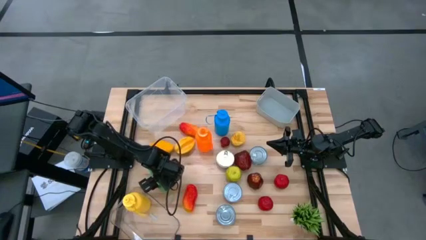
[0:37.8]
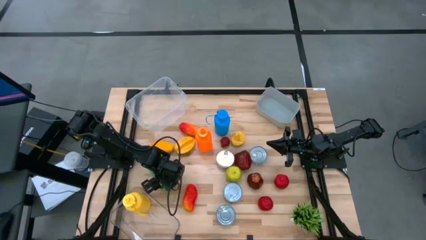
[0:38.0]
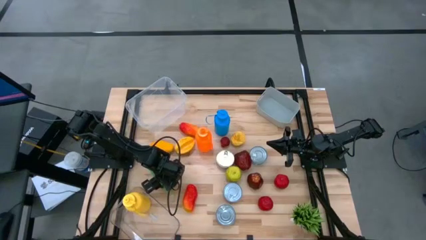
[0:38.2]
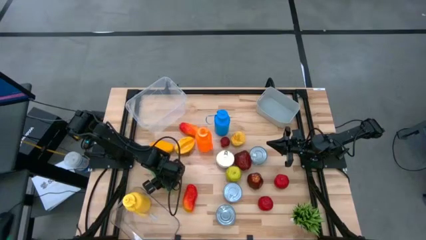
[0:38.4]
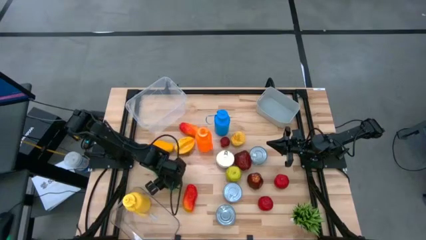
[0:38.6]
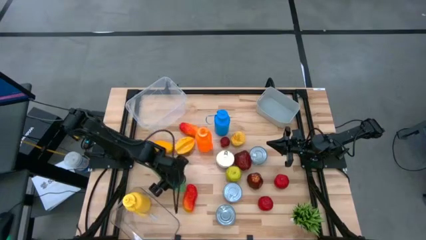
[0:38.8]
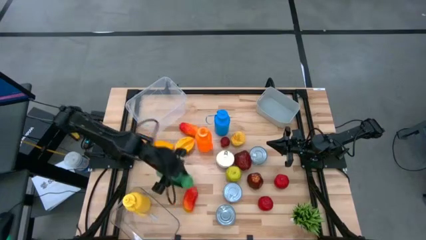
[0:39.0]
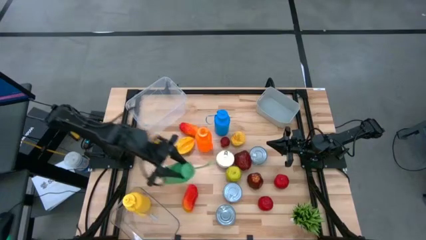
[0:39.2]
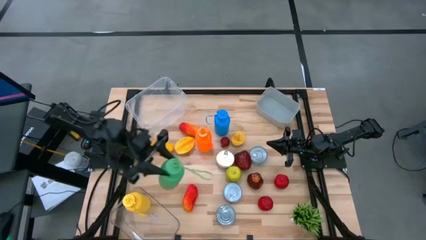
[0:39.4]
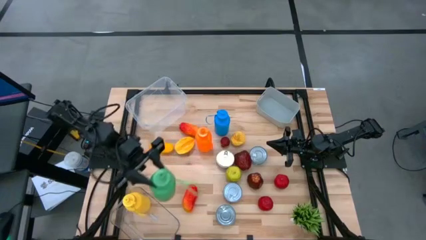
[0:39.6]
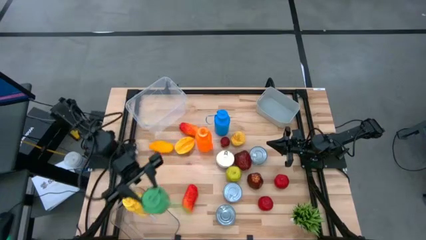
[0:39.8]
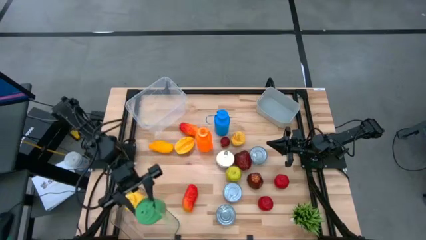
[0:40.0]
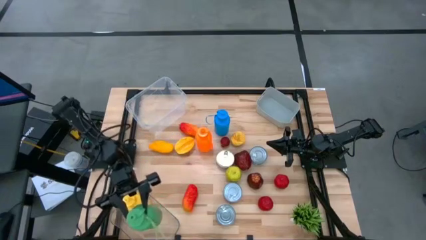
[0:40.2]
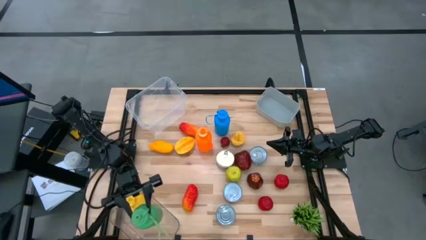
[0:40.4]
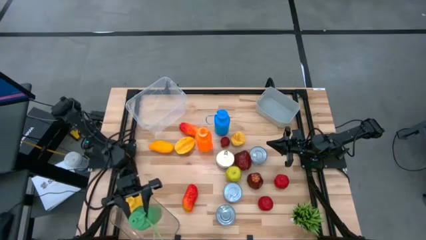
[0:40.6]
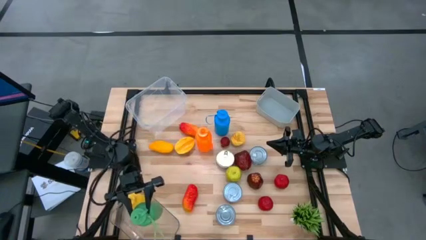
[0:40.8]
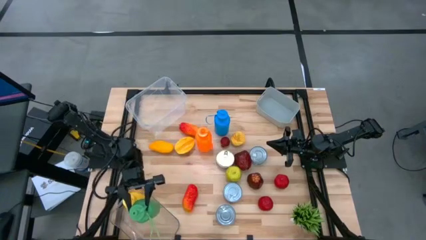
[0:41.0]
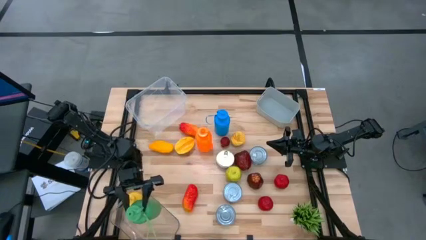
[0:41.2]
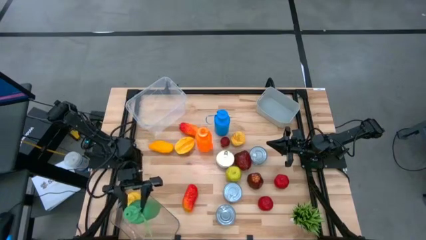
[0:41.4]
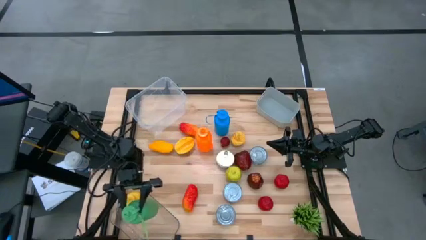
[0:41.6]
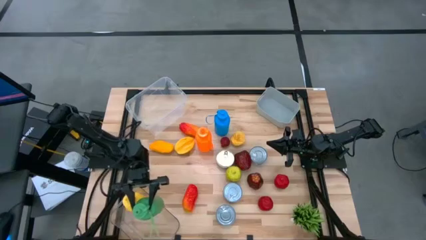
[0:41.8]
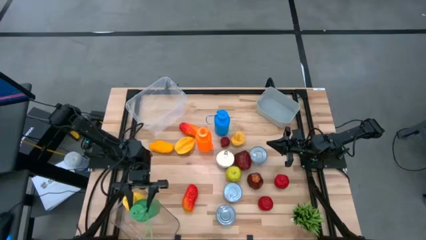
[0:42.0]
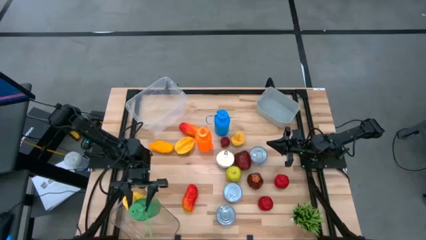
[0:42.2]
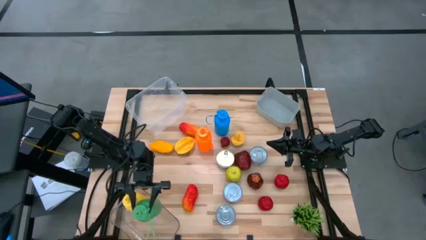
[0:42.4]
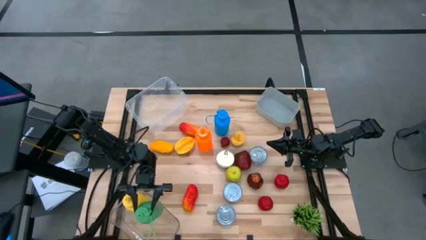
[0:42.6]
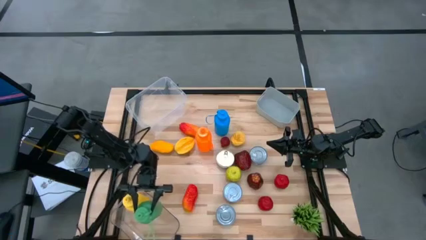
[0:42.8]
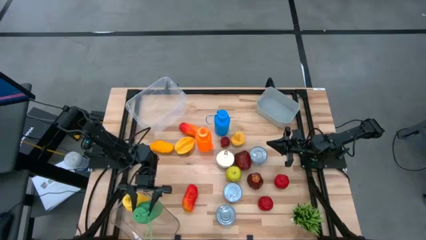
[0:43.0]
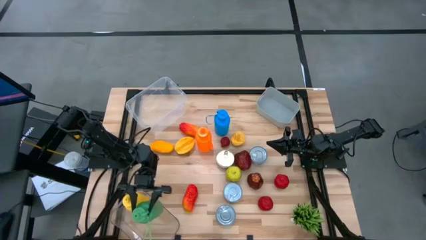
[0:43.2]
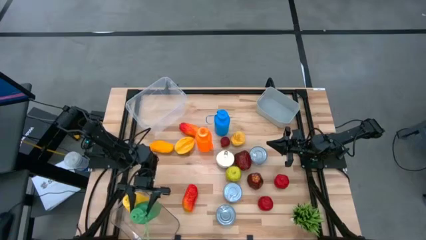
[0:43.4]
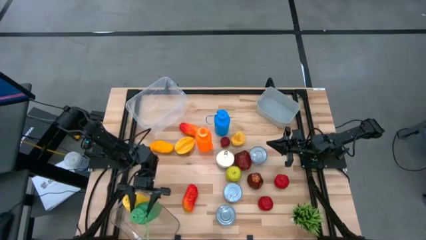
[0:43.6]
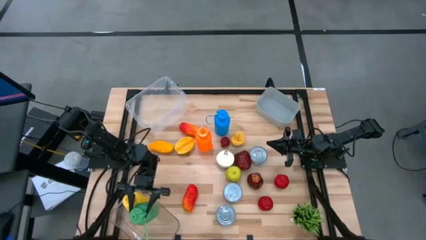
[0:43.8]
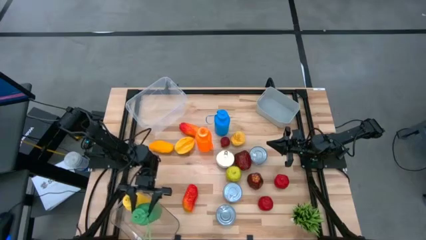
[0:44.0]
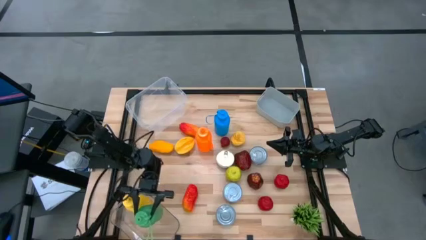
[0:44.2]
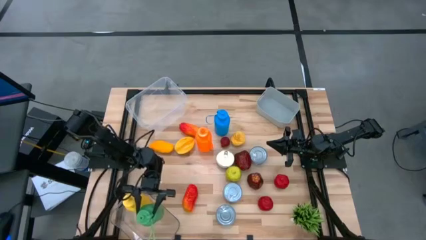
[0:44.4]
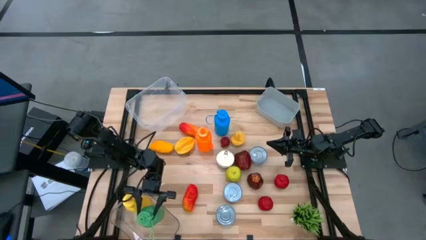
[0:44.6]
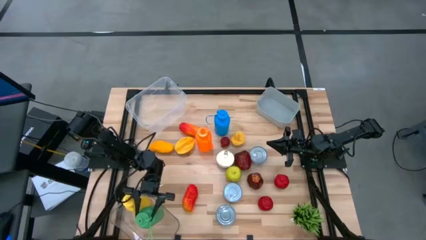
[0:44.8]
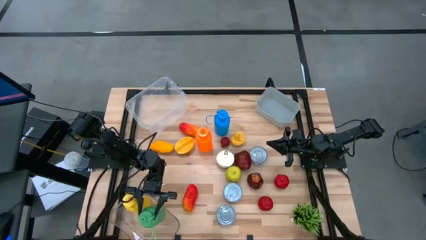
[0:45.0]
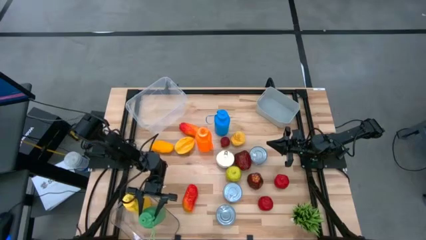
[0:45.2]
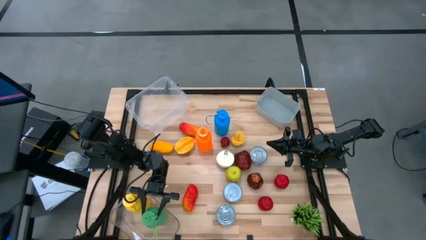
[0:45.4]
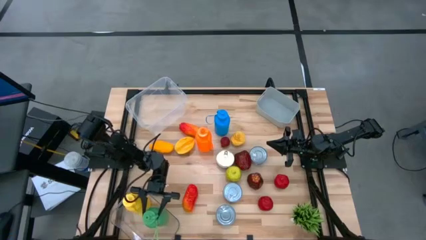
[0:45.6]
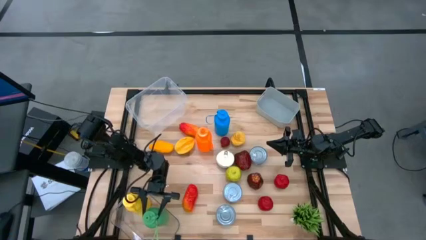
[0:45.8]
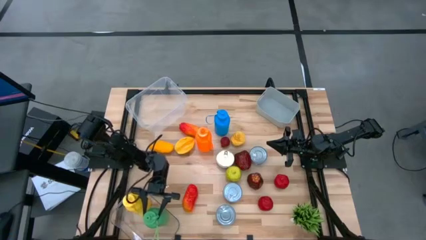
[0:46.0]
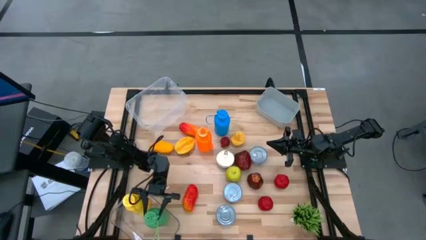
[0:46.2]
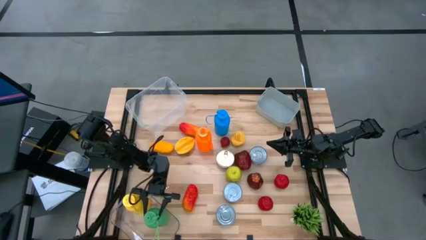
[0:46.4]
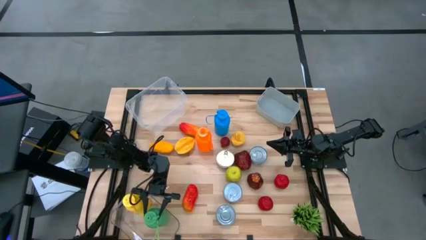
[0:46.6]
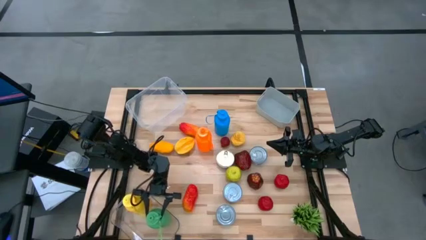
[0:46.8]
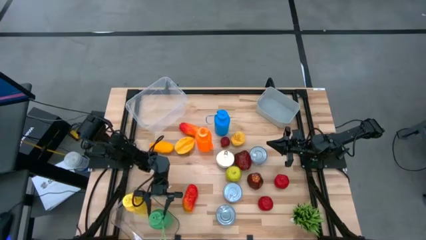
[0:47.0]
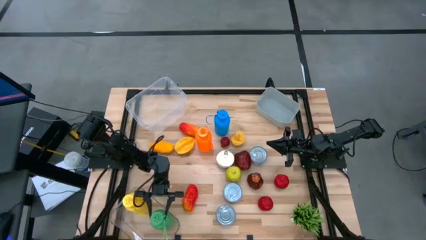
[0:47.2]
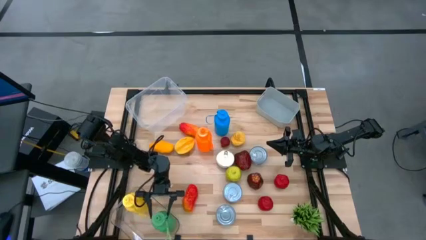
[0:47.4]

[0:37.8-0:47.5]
Task: Pick & Place Food Item
Put the green water bottle into the transparent bin

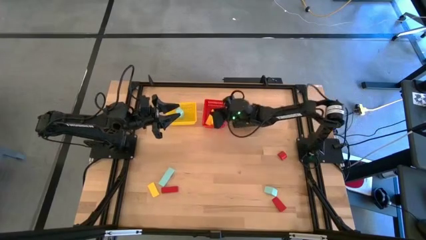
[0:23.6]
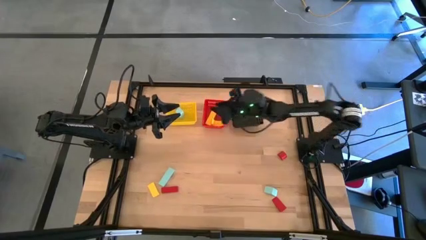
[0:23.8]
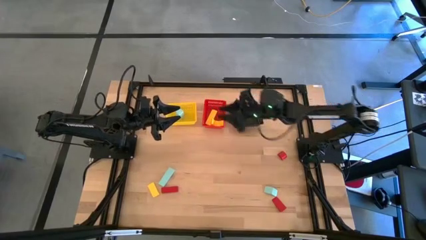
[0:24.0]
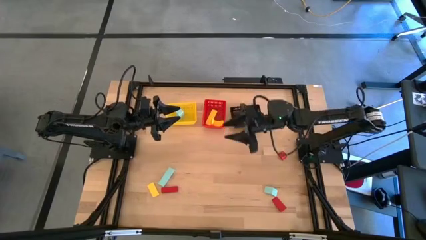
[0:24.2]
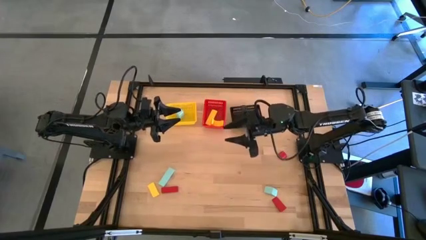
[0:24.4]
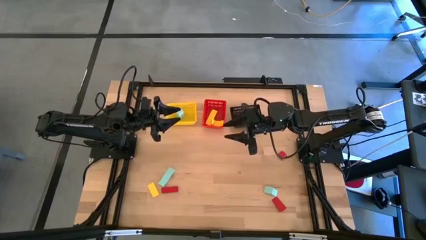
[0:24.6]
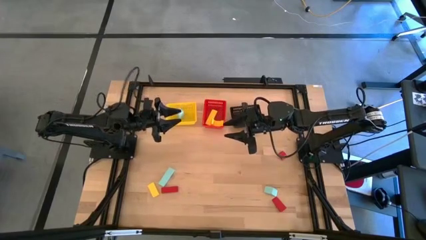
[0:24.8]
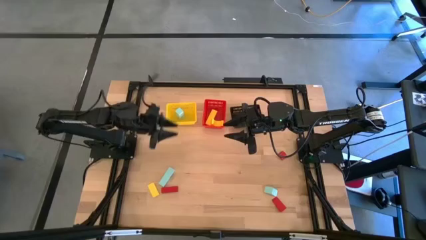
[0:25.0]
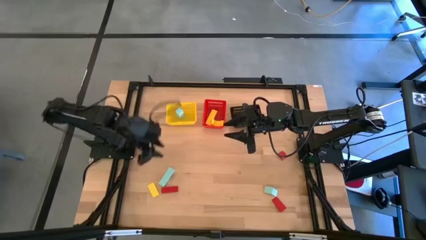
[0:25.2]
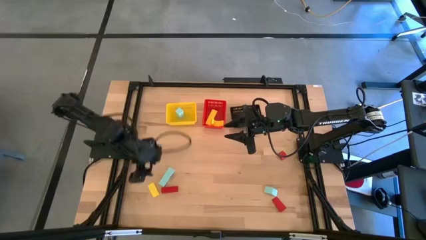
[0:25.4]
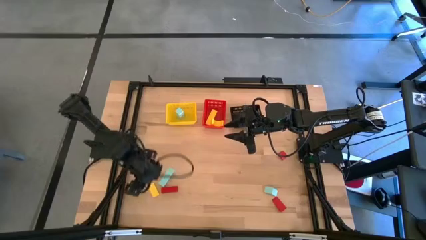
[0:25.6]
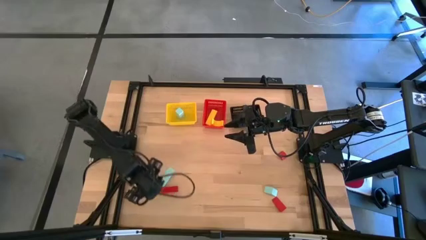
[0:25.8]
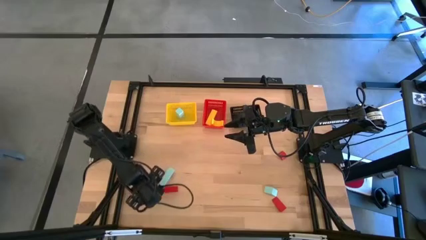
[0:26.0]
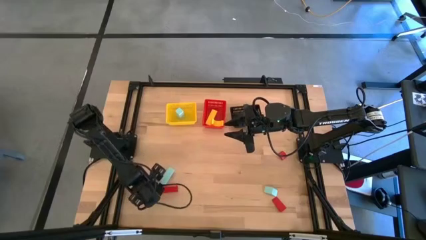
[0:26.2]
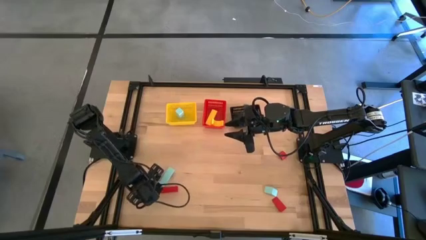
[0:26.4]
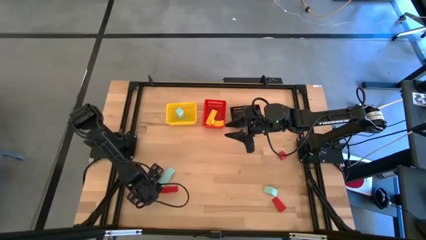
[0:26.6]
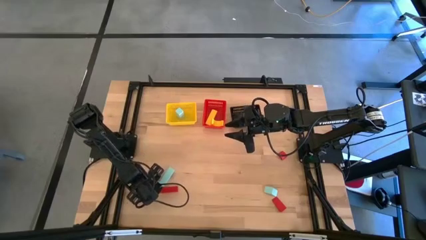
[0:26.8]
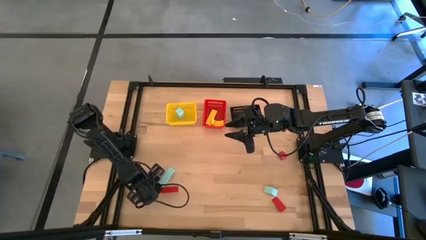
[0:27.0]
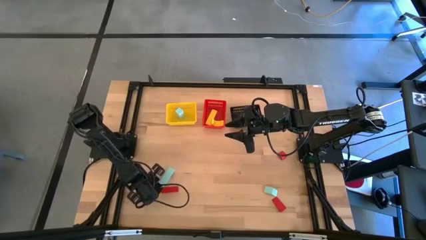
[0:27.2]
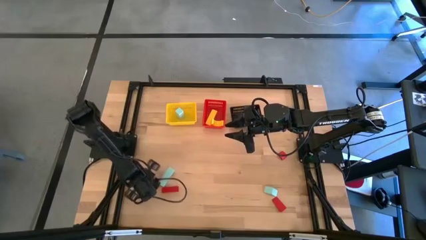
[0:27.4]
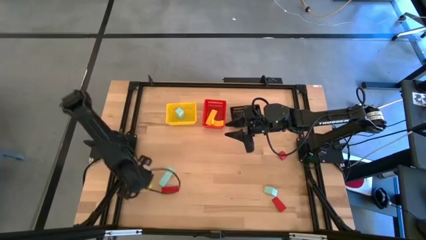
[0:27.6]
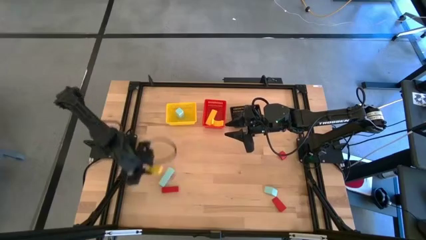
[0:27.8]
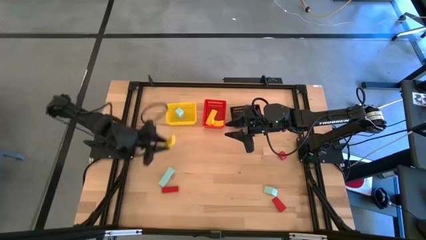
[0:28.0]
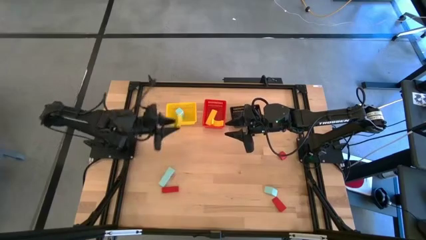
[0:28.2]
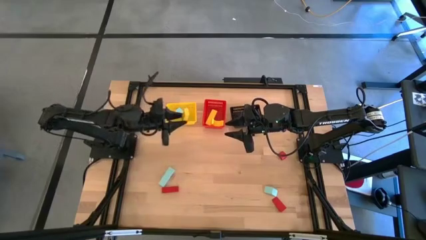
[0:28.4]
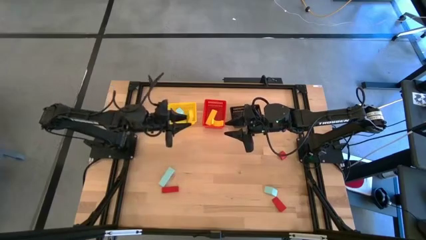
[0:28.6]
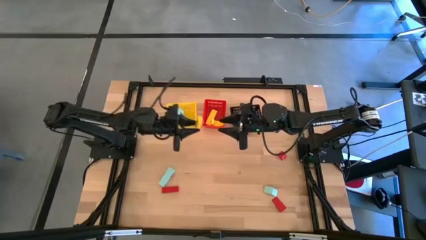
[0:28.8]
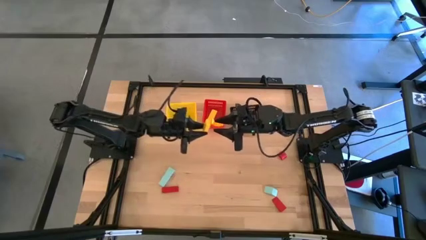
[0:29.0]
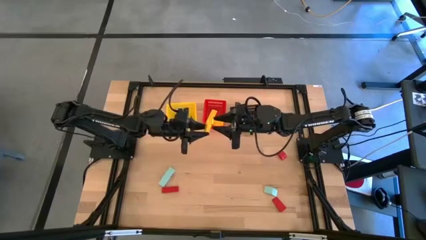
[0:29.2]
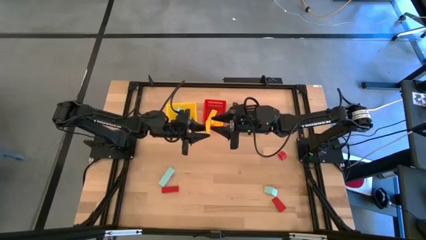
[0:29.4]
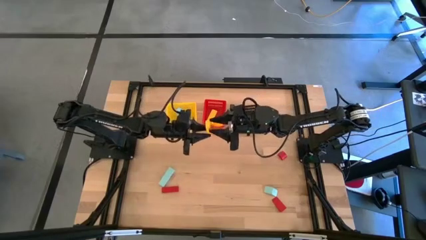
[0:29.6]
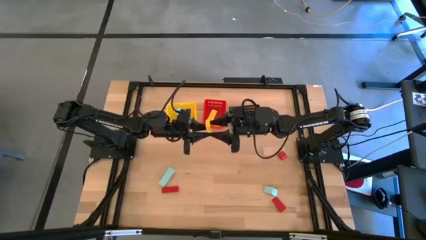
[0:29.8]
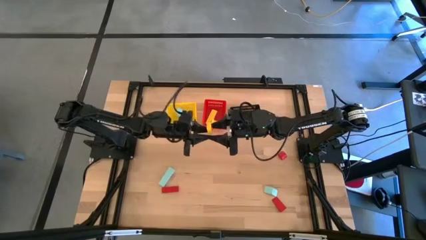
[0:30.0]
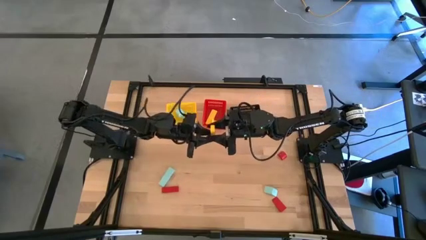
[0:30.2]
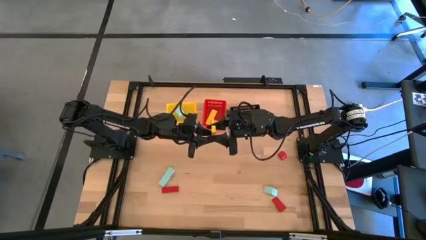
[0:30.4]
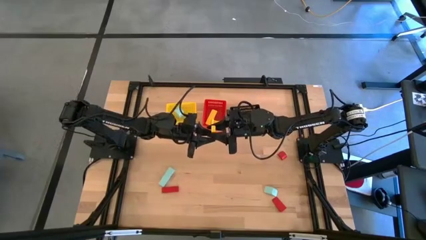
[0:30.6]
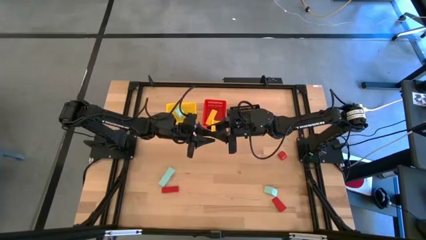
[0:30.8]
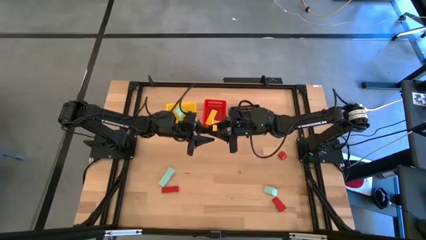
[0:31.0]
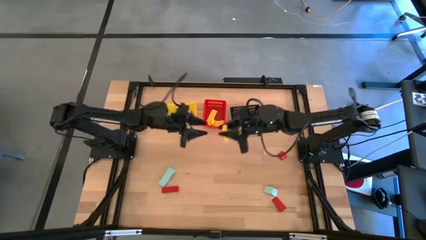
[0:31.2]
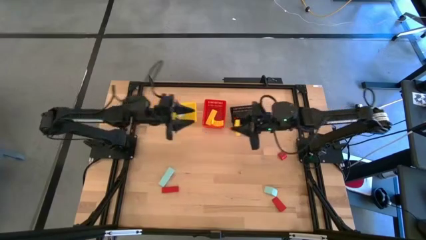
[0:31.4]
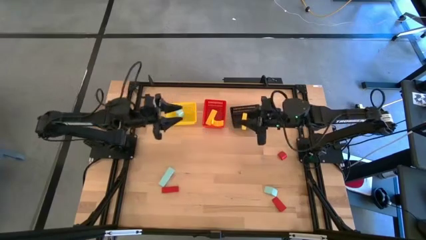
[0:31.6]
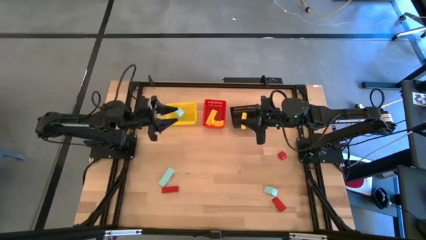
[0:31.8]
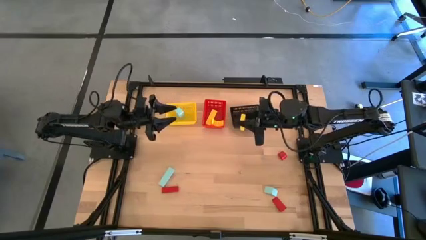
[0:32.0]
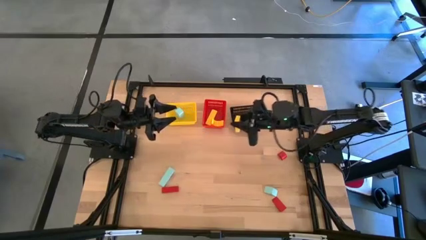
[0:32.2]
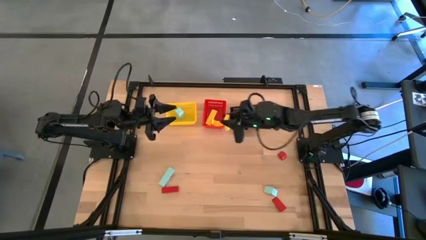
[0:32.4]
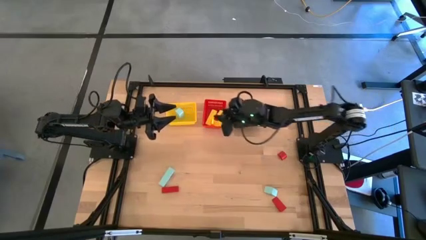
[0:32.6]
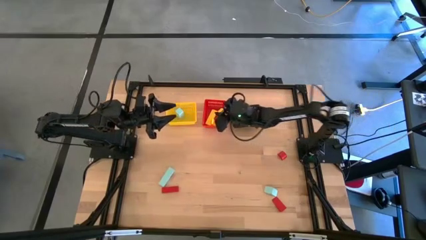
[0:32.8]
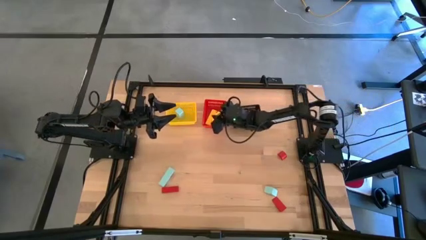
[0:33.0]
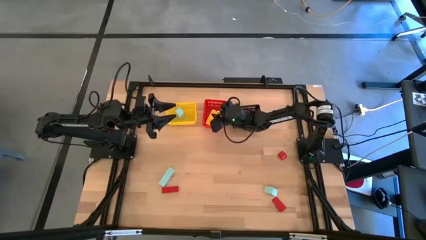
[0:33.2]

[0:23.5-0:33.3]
Task: Sort & place blocks by color
Put the yellow block into the red basket
